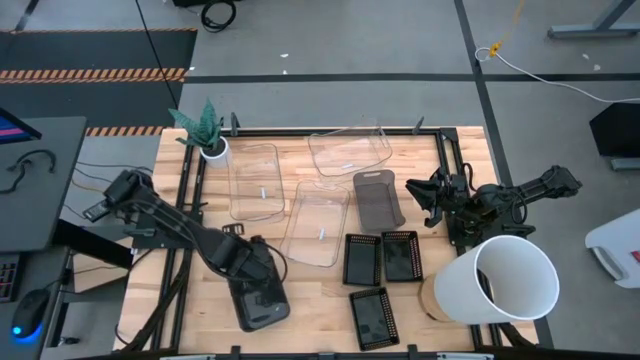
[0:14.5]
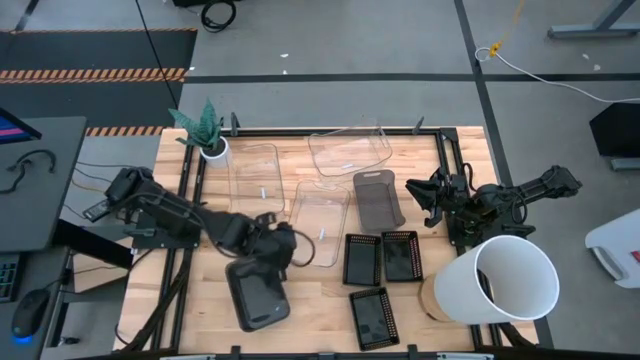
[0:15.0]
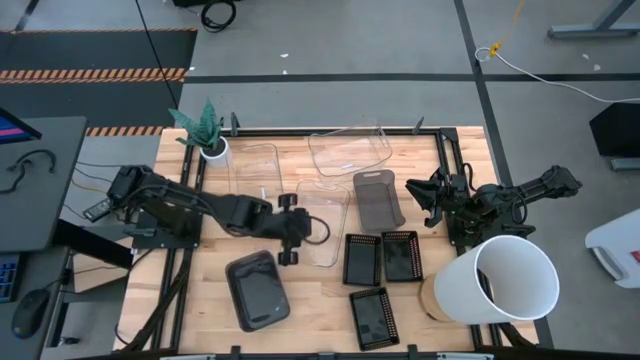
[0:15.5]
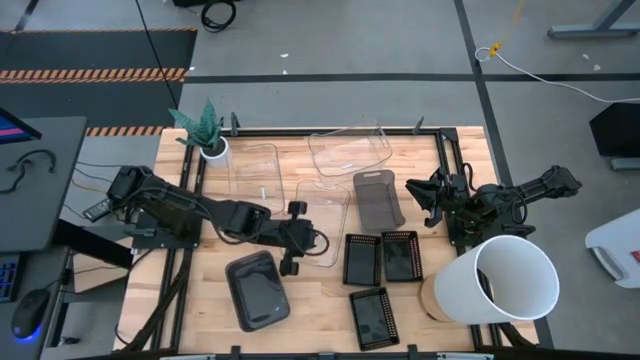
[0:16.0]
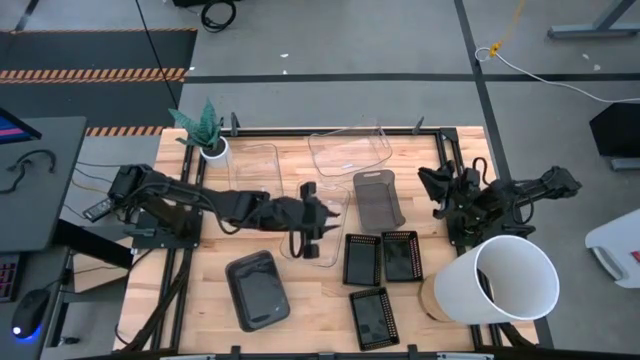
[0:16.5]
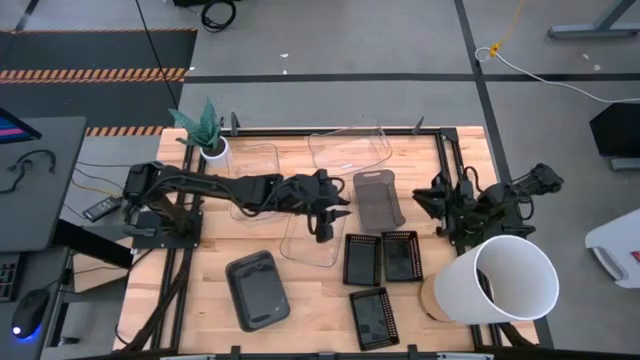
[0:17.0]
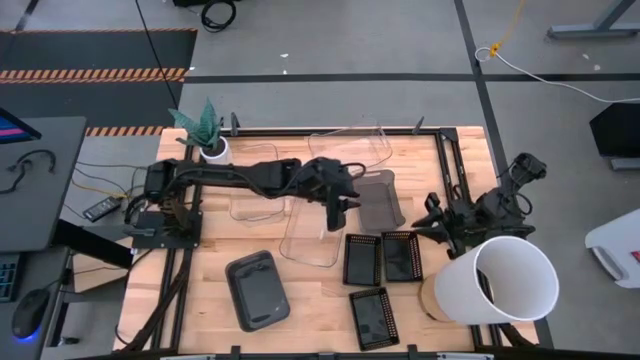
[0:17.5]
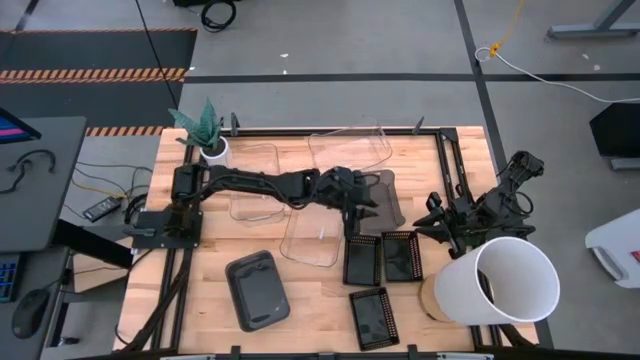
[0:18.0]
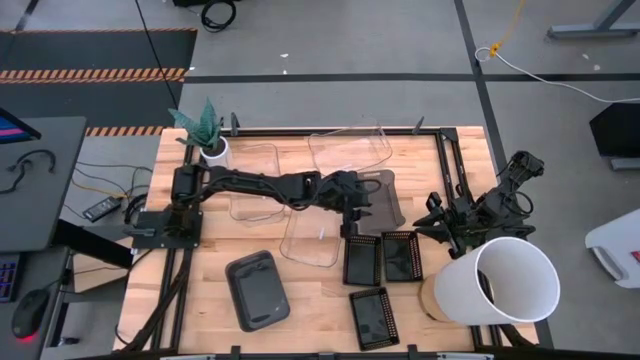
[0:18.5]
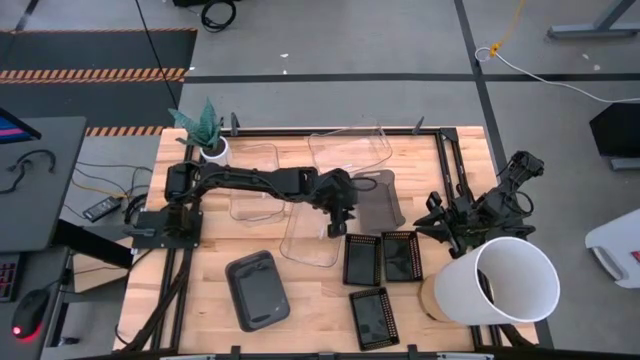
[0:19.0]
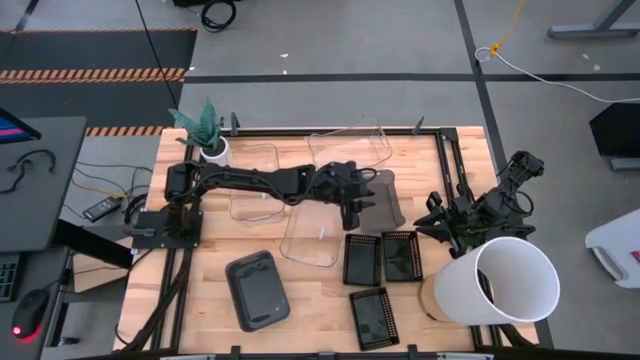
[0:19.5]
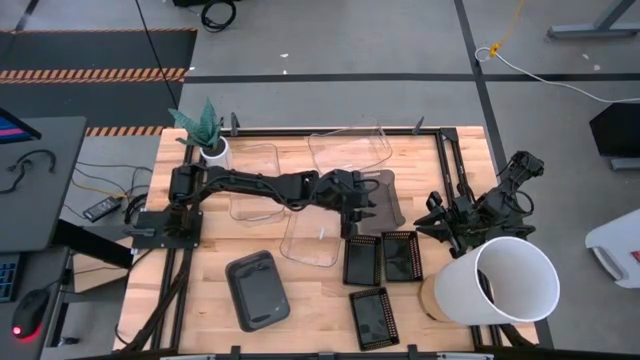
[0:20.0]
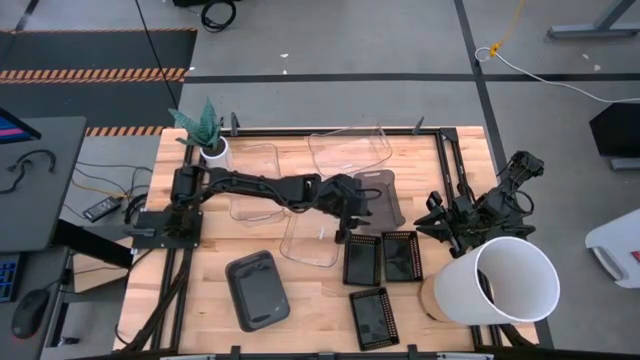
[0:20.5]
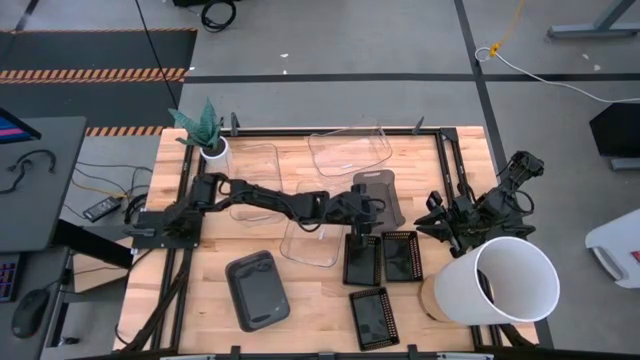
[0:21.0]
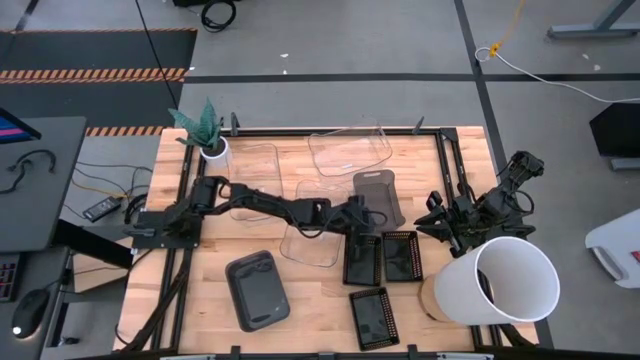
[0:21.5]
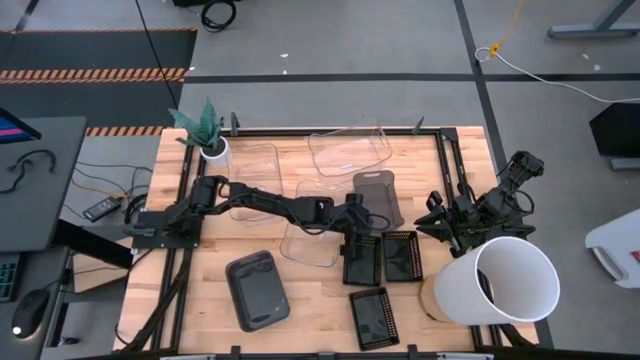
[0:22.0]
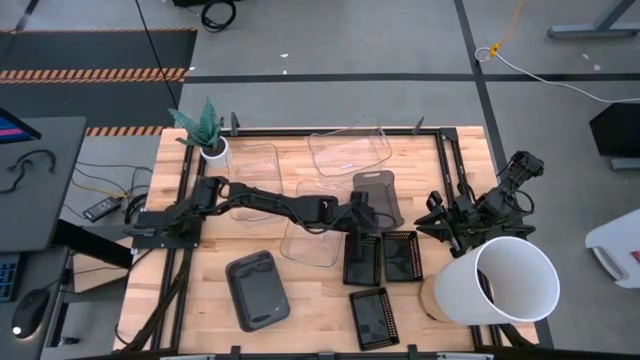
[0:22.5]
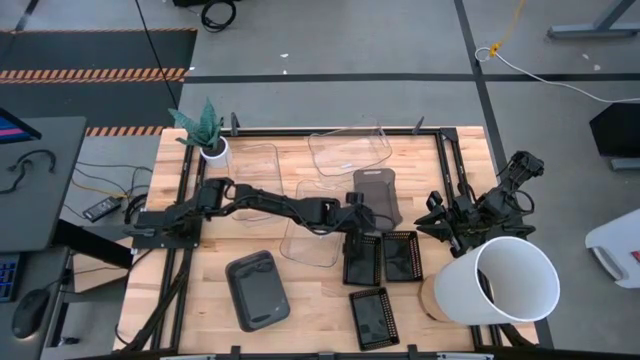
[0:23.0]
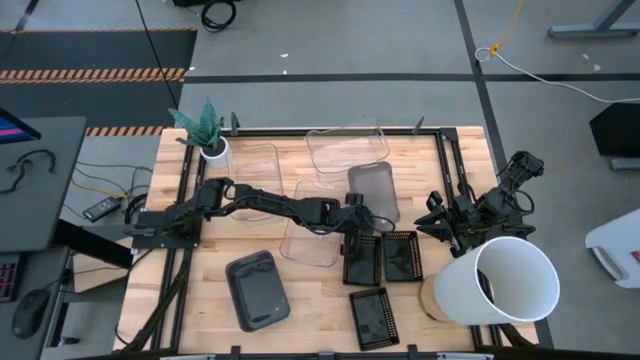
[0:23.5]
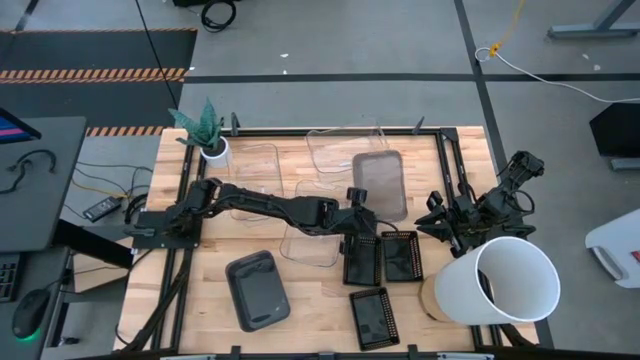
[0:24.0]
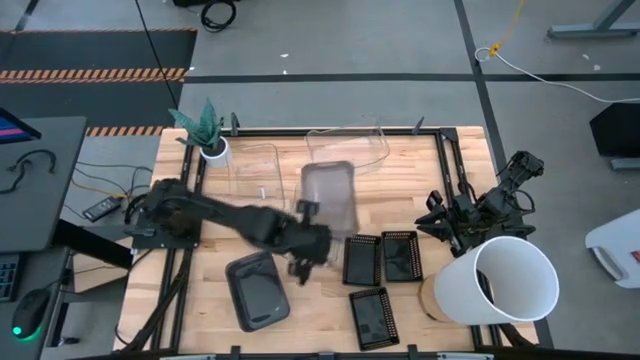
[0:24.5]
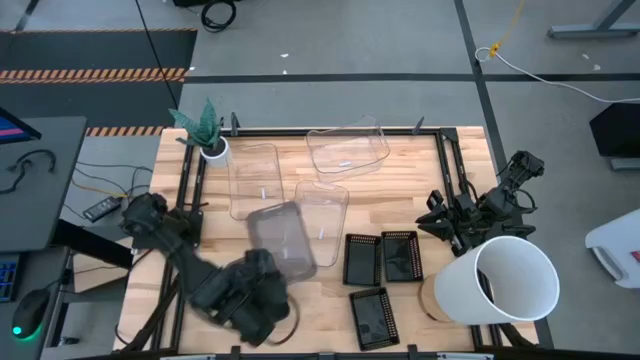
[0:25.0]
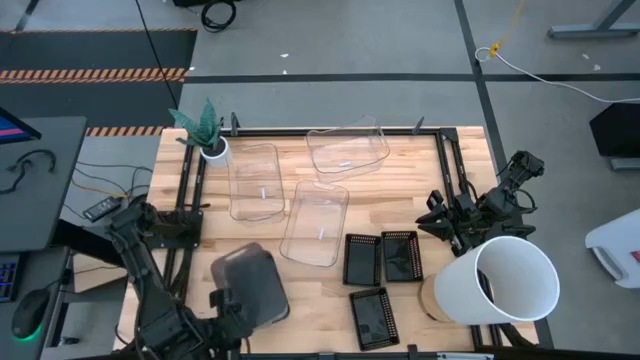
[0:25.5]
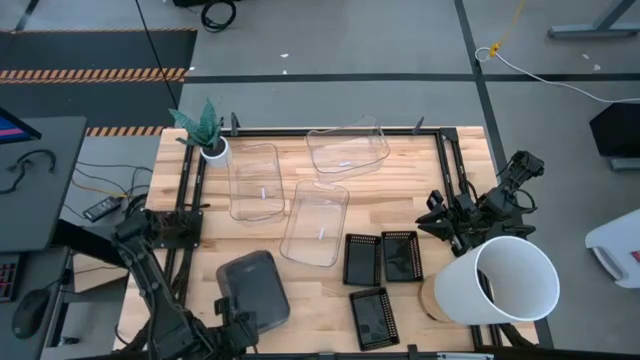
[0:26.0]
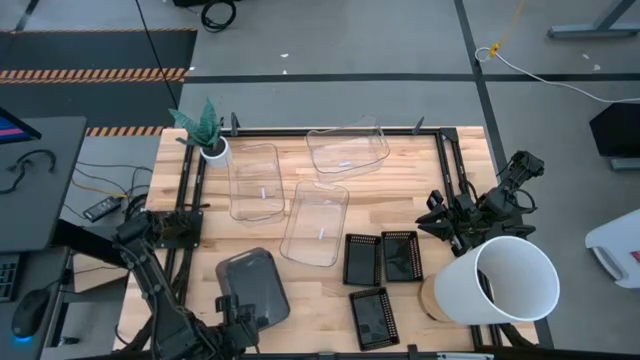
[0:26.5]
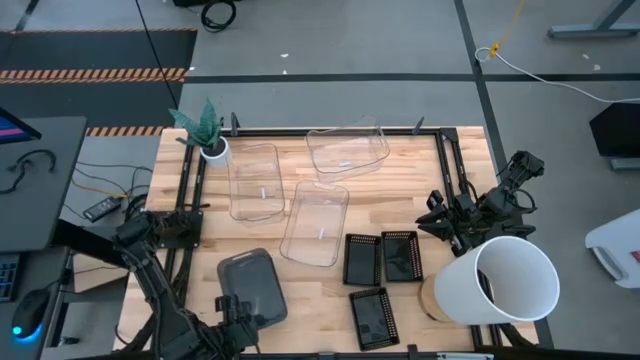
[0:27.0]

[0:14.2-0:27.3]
Stack the top black bin on the bottom black bin

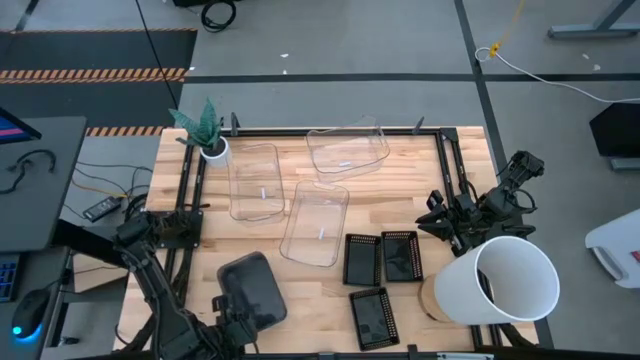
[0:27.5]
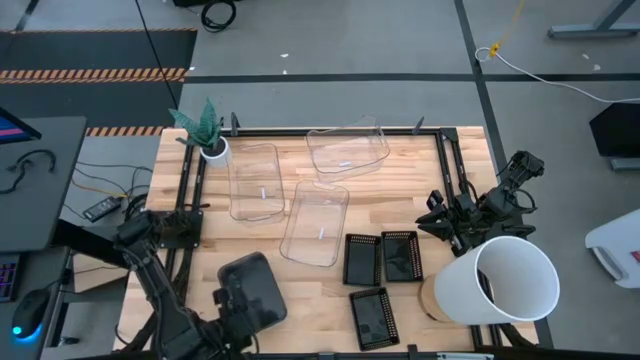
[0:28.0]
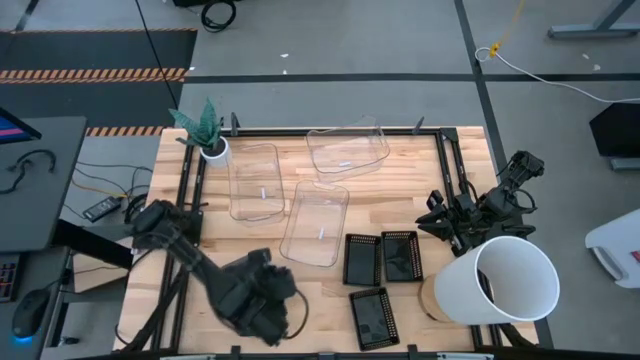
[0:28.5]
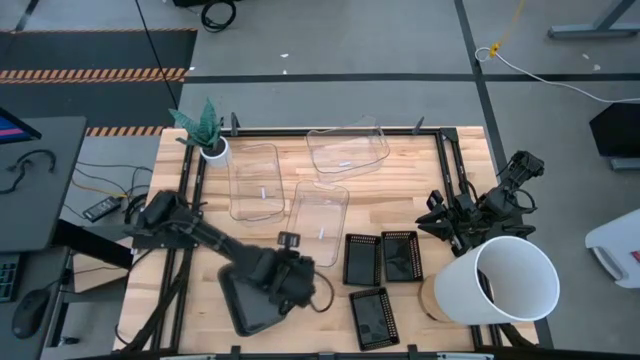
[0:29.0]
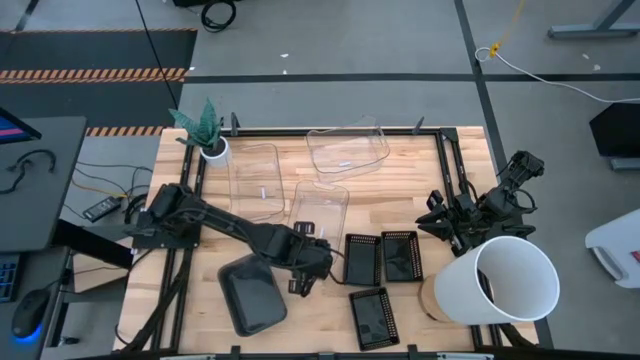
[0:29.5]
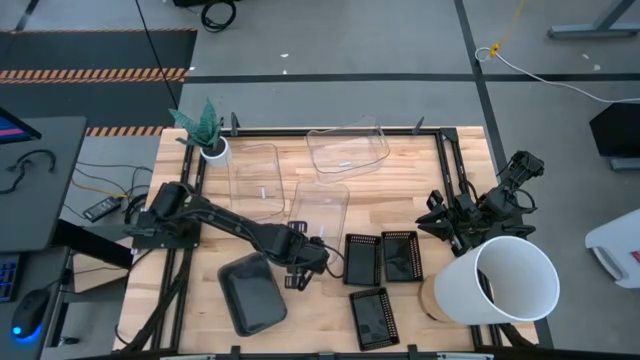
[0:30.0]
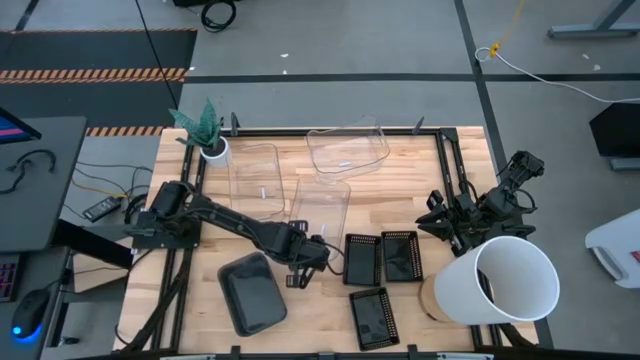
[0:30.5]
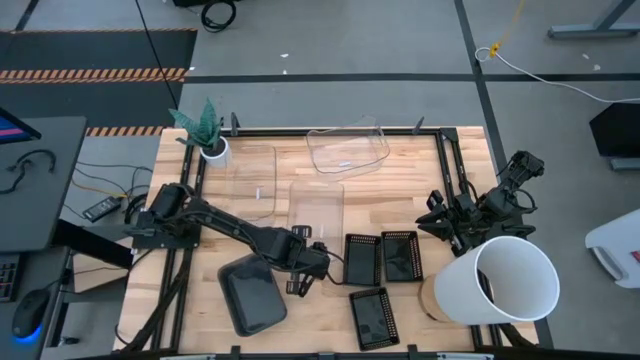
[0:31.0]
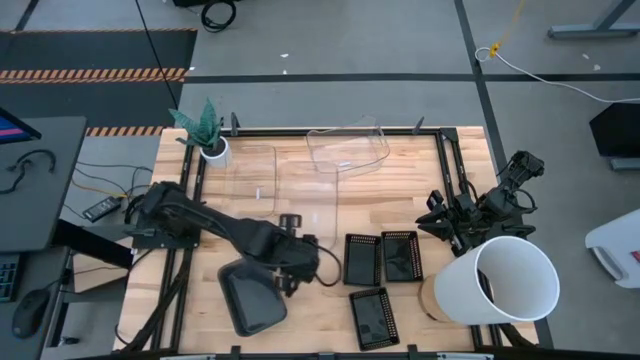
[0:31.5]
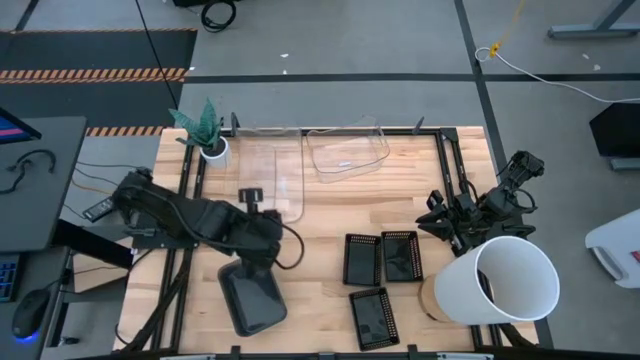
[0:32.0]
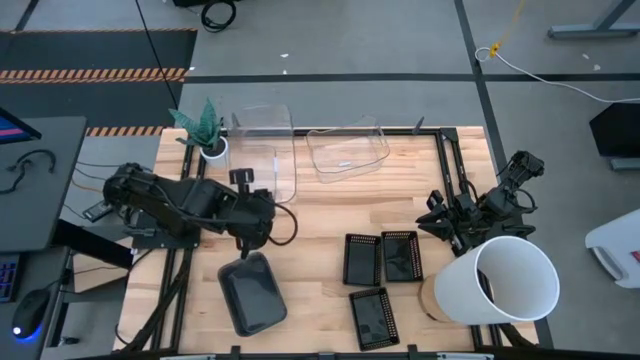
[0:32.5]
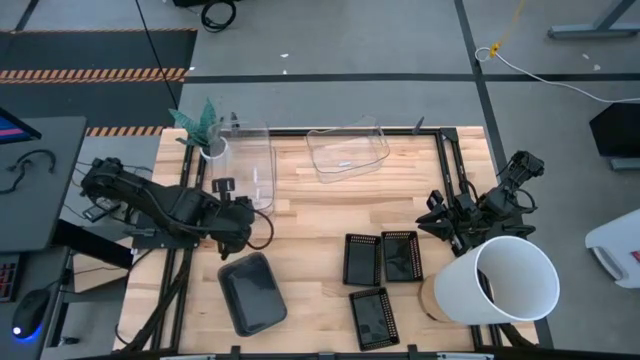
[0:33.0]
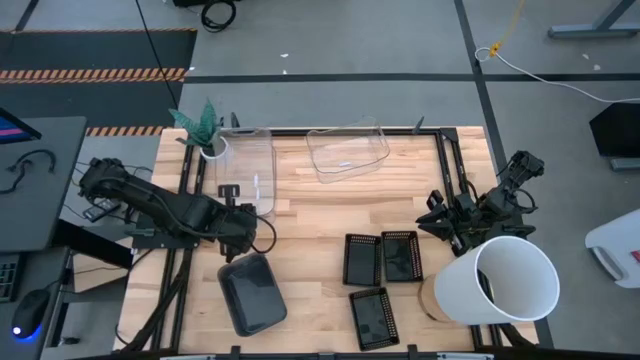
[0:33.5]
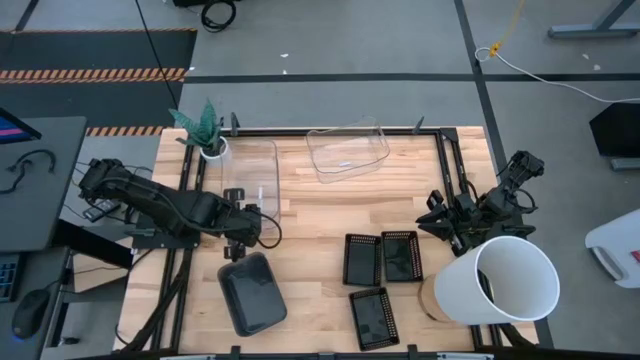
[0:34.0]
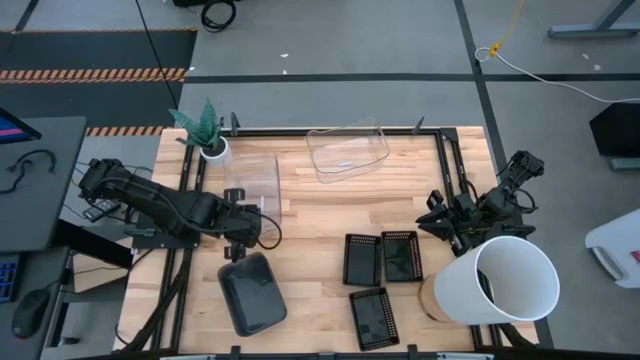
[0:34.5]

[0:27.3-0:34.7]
Stack the bottom transparent bin on the top left transparent bin
